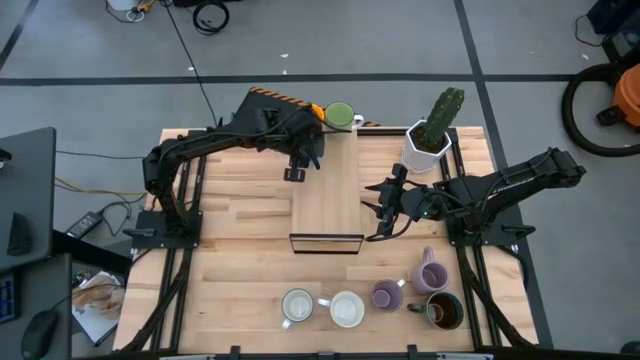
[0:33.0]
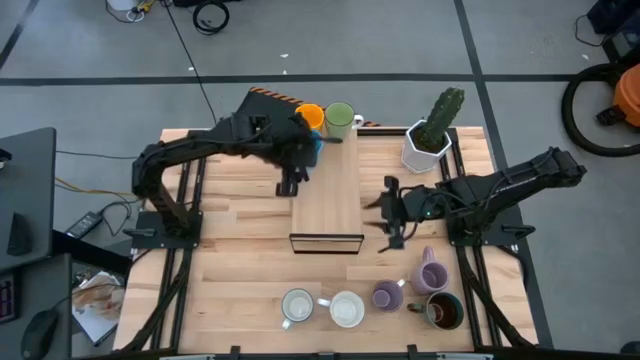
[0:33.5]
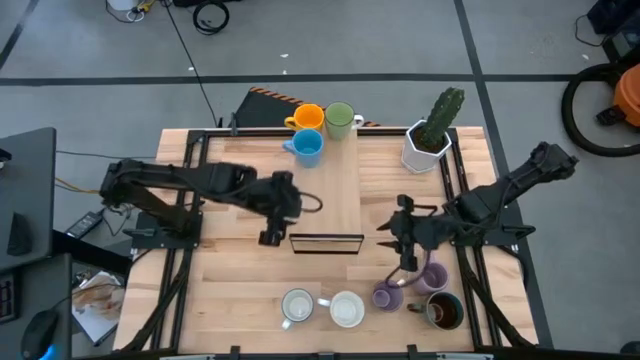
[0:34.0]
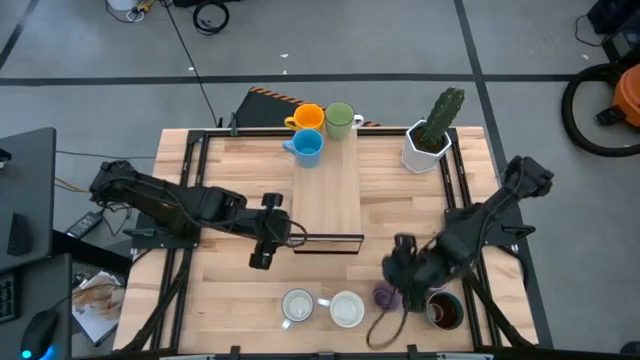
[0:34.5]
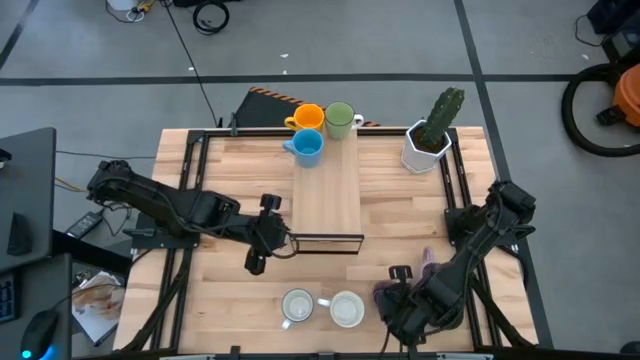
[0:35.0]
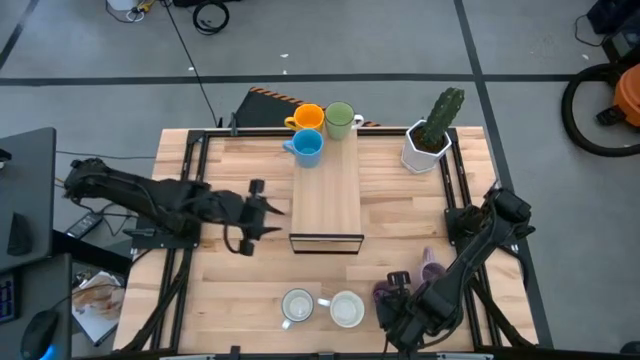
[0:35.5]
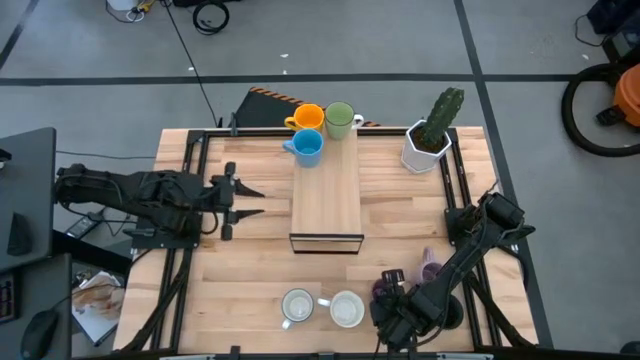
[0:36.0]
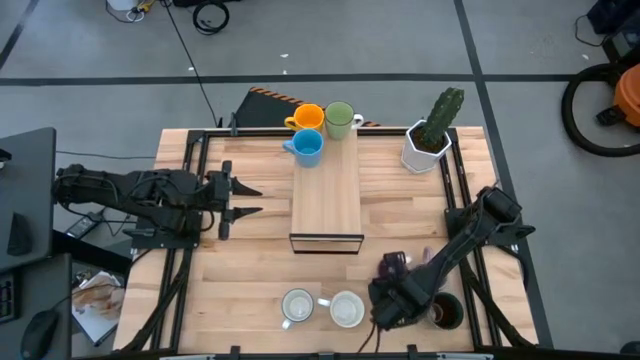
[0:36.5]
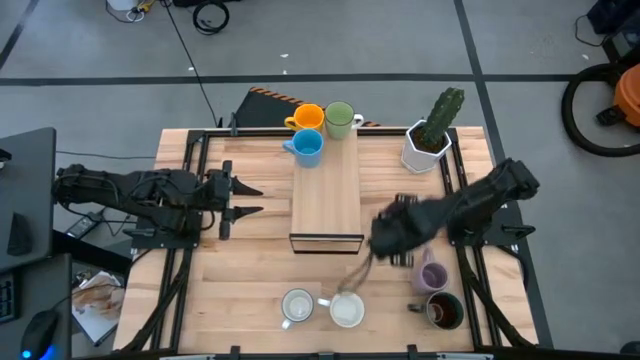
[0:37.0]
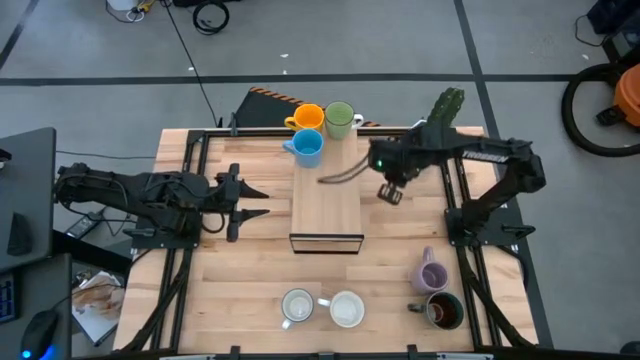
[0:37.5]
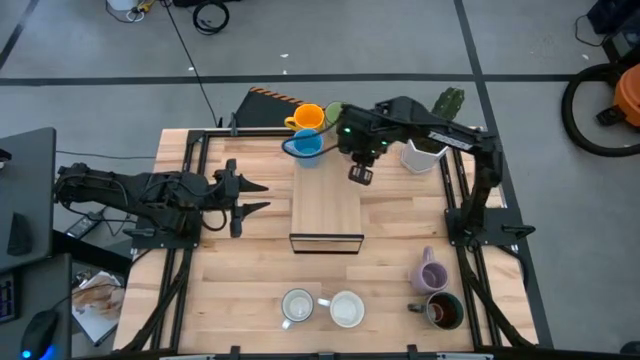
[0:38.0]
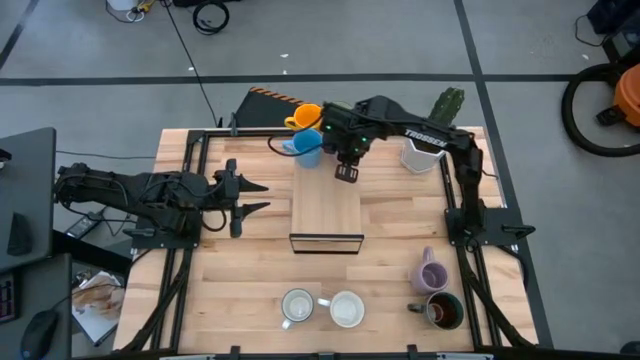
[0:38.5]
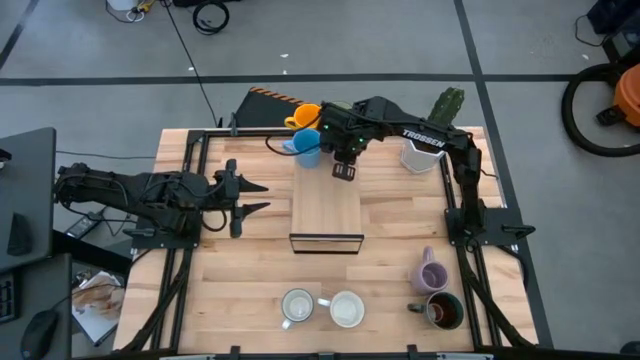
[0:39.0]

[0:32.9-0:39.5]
Task: Place coffee mugs
Put the patterned purple mug on the shelf

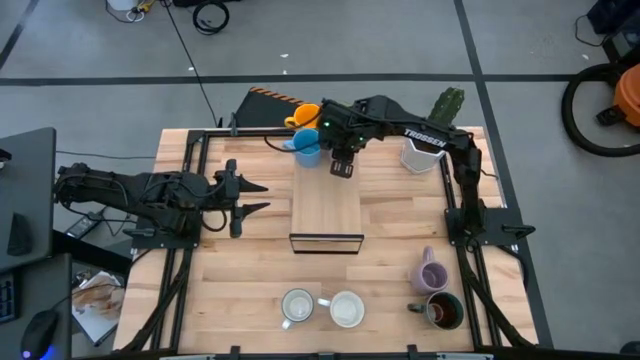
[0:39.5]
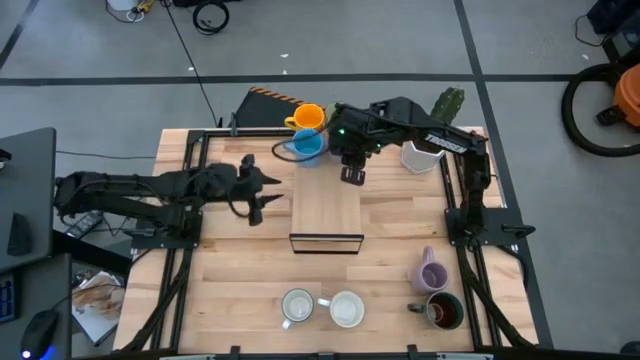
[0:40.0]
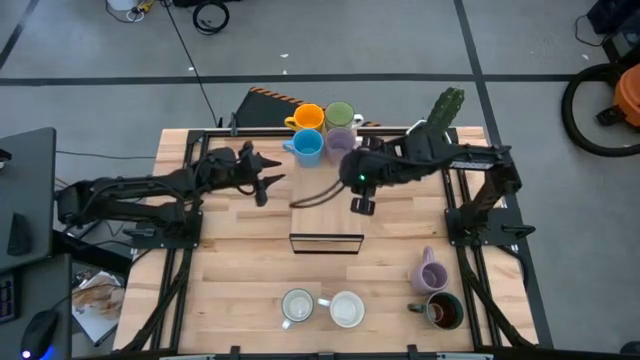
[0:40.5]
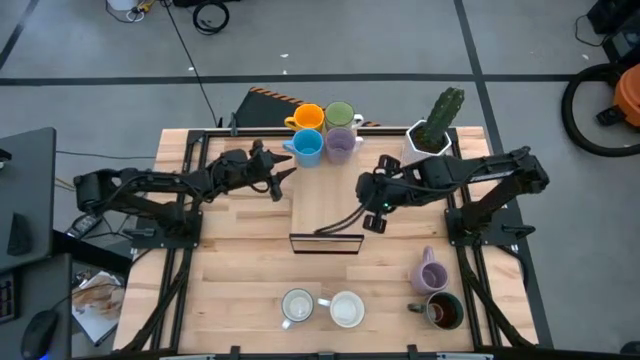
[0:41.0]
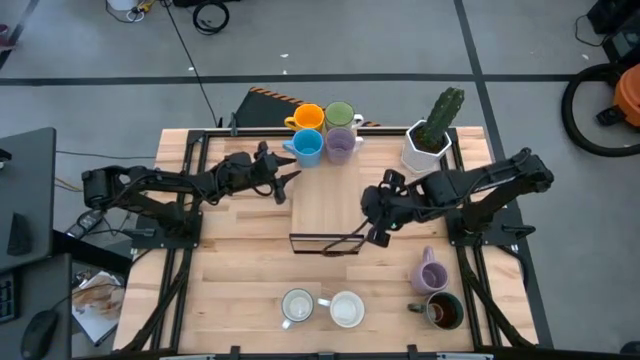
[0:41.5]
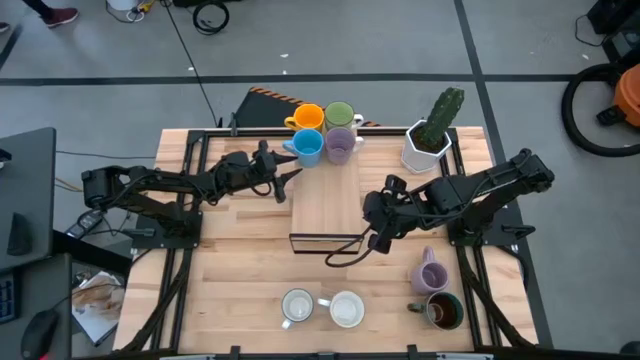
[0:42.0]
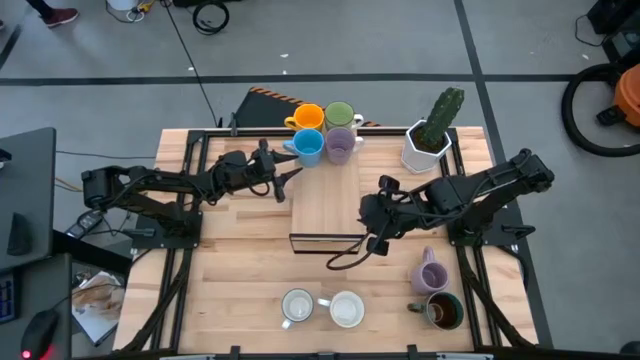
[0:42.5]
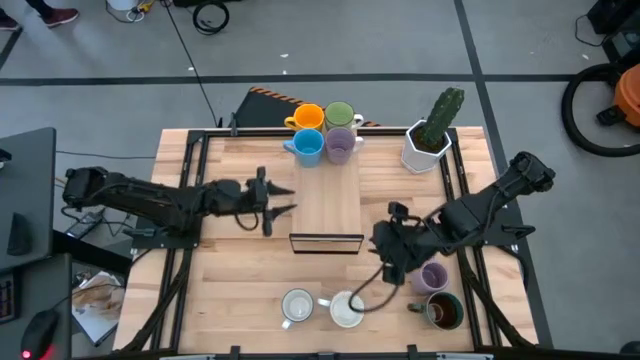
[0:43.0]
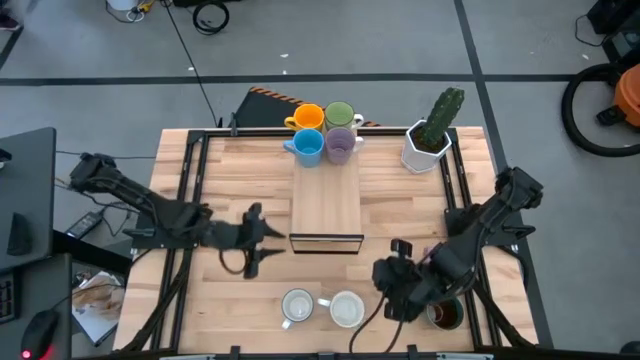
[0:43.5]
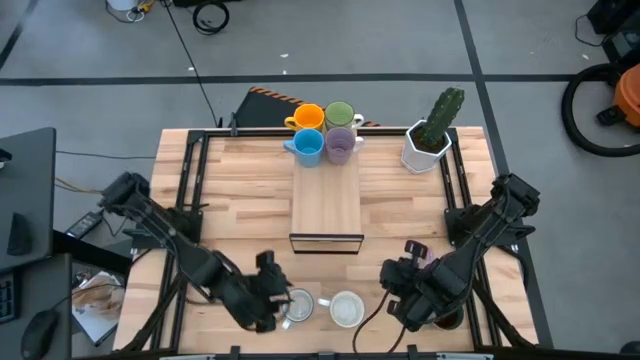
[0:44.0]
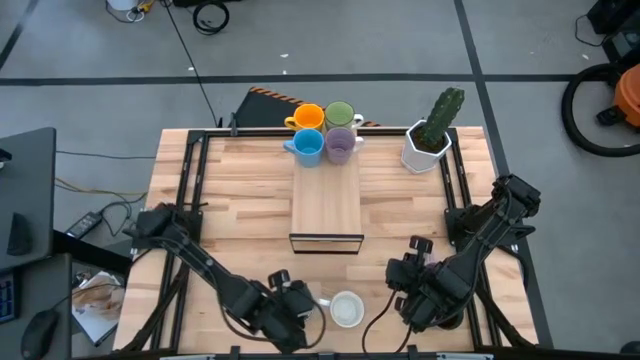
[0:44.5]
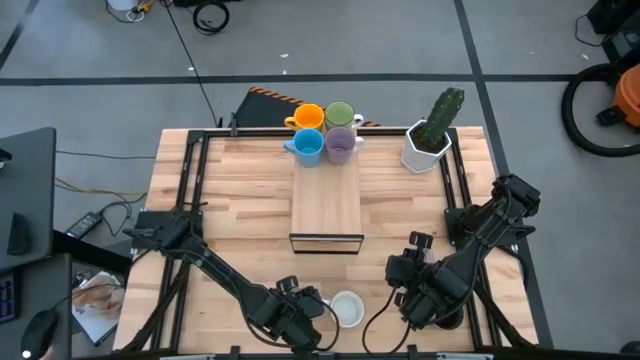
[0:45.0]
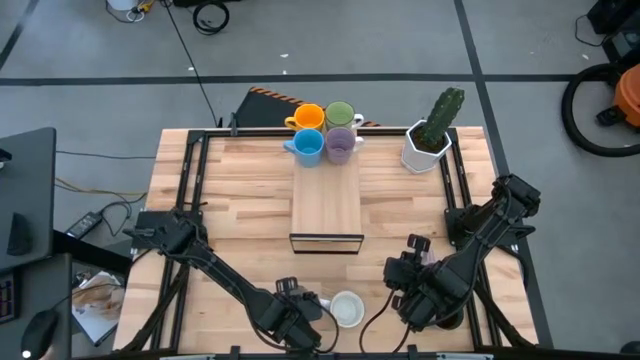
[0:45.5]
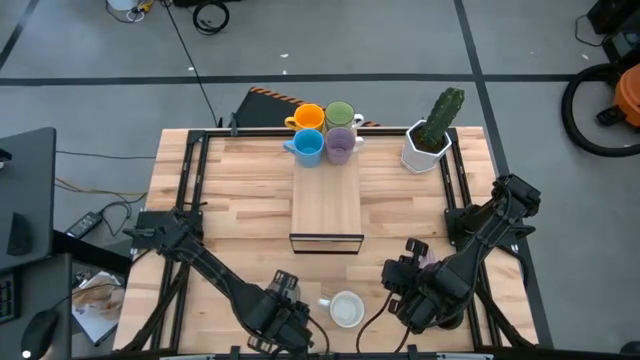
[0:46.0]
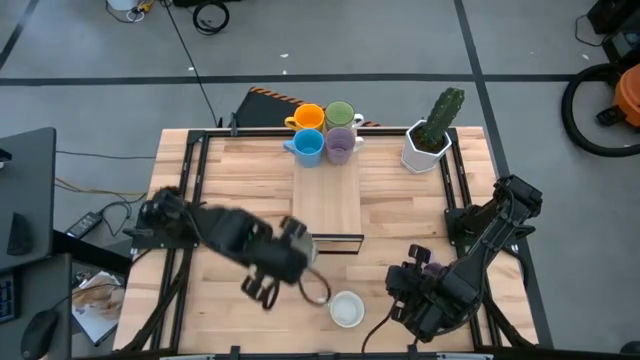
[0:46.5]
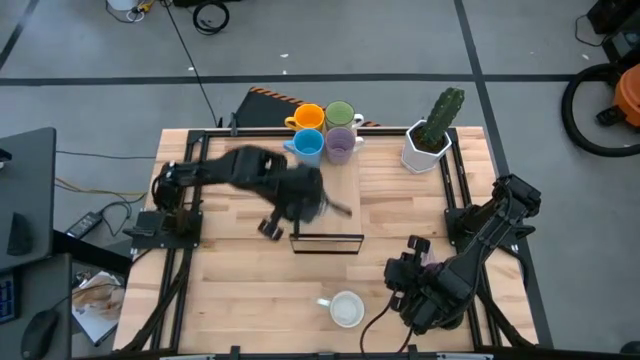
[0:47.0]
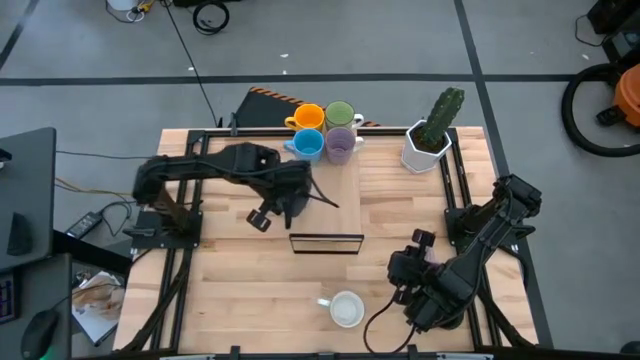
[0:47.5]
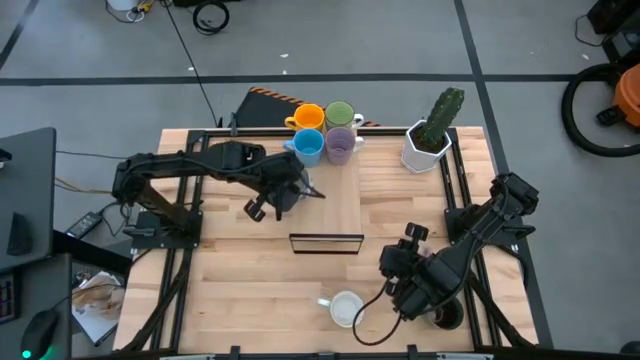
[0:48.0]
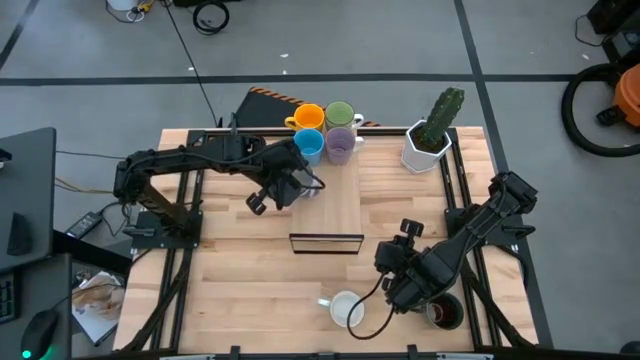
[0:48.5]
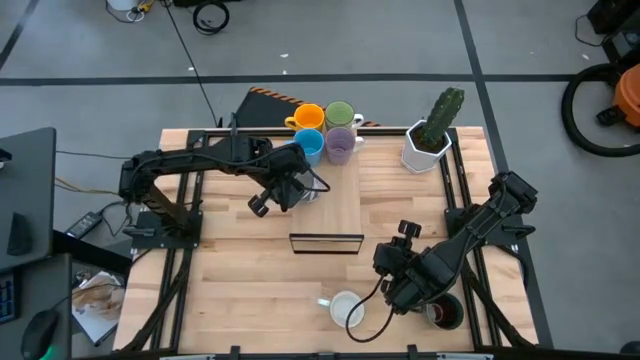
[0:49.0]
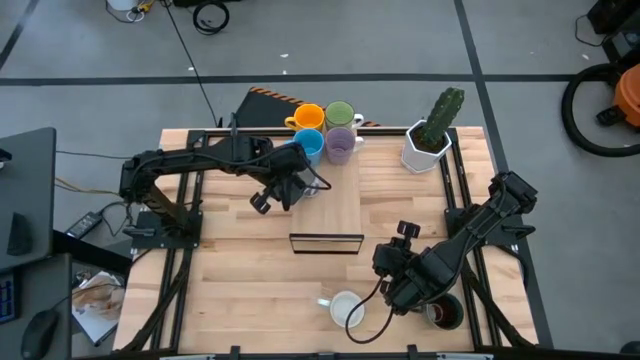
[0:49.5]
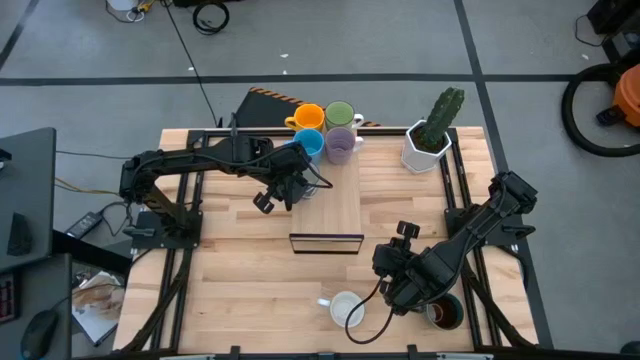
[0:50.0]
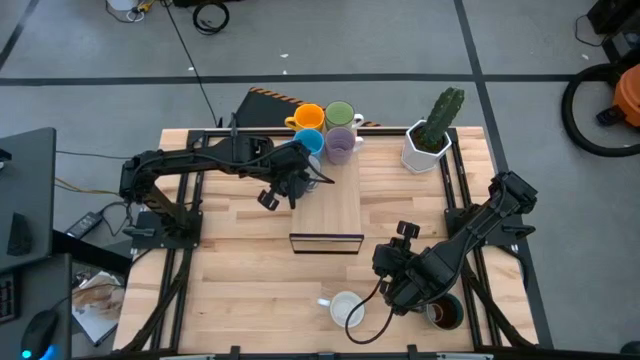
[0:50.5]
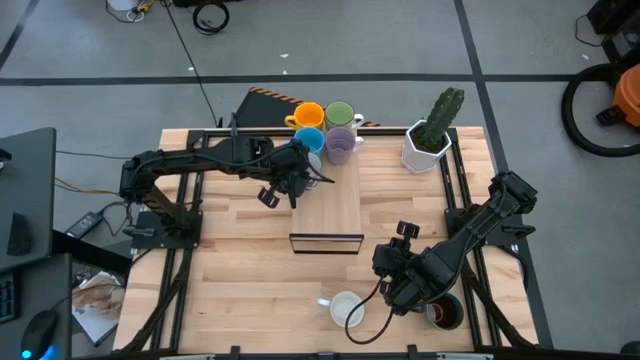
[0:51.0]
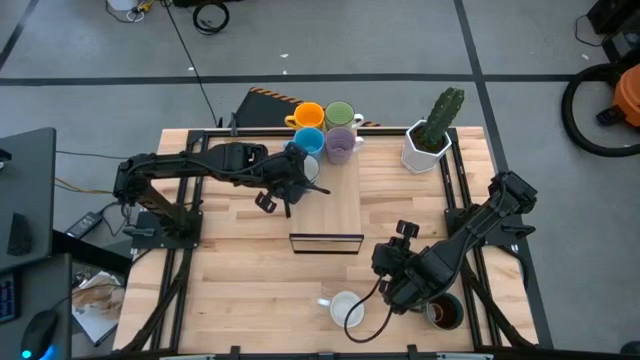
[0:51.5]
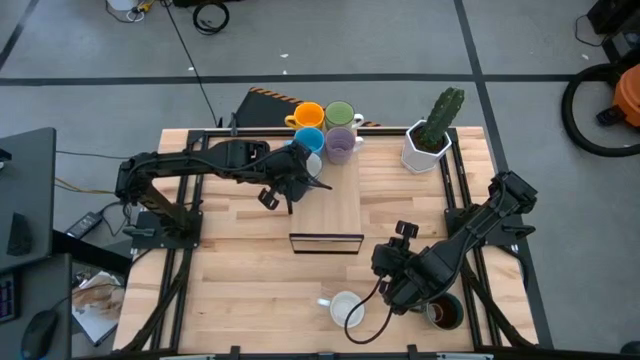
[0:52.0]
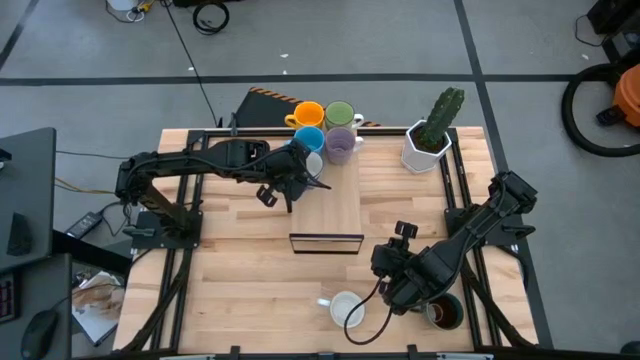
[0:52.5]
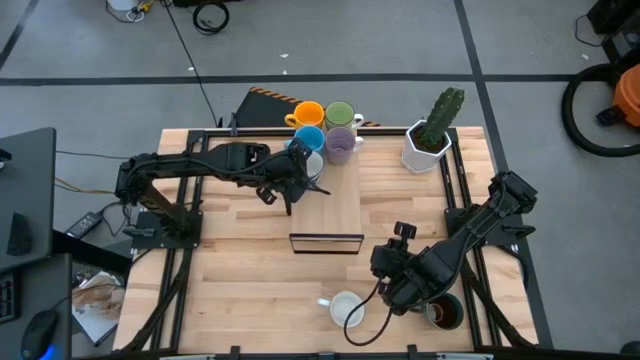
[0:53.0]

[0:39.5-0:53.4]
Put the white and blue mug on the shelf
